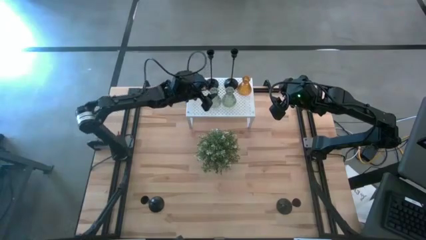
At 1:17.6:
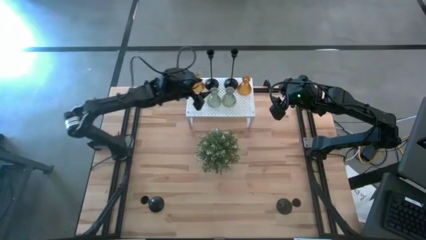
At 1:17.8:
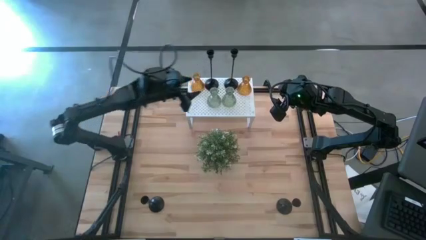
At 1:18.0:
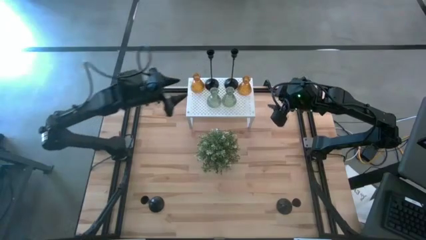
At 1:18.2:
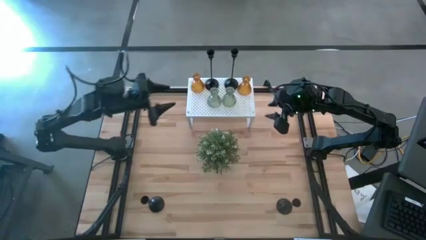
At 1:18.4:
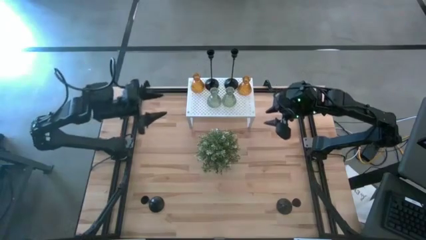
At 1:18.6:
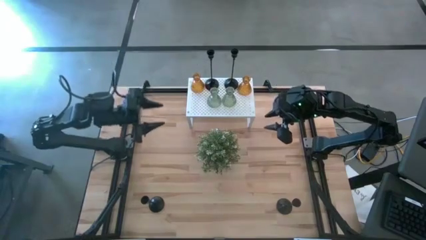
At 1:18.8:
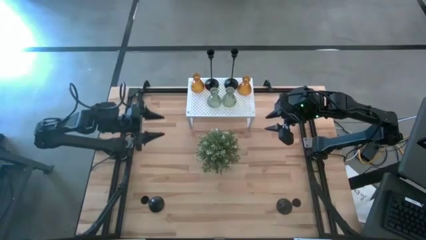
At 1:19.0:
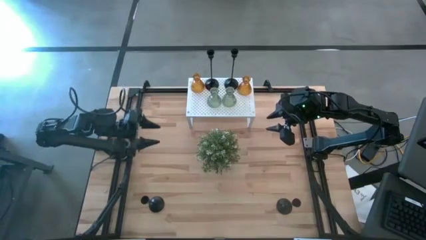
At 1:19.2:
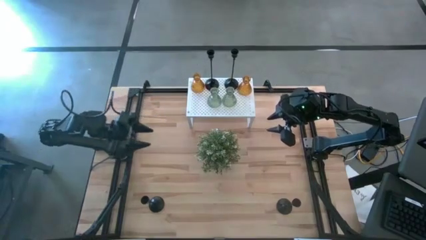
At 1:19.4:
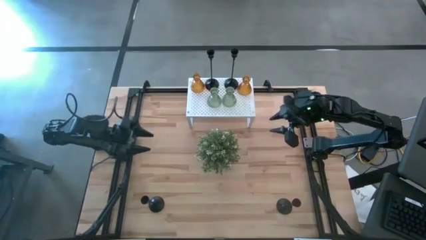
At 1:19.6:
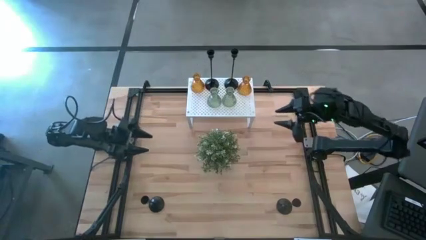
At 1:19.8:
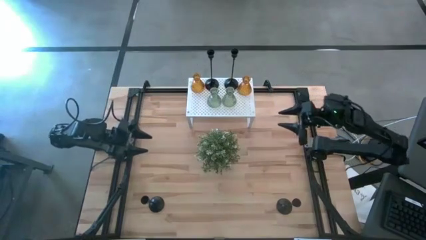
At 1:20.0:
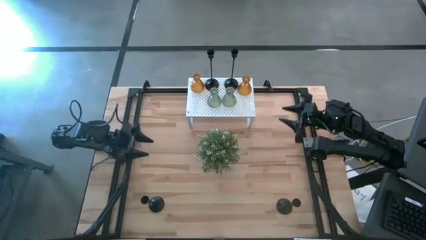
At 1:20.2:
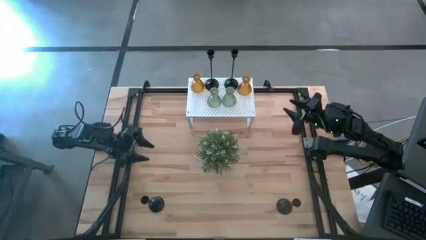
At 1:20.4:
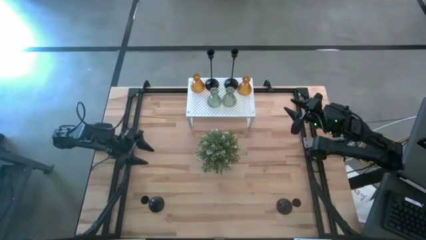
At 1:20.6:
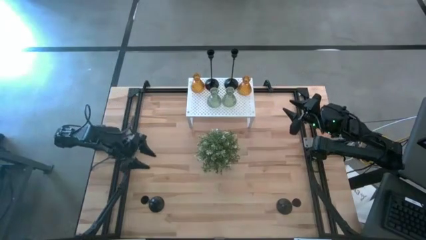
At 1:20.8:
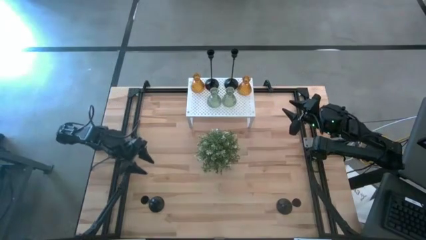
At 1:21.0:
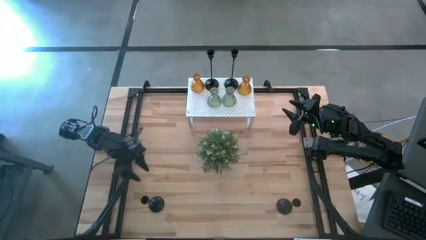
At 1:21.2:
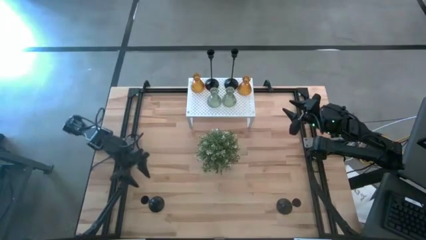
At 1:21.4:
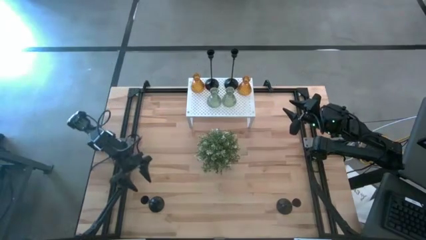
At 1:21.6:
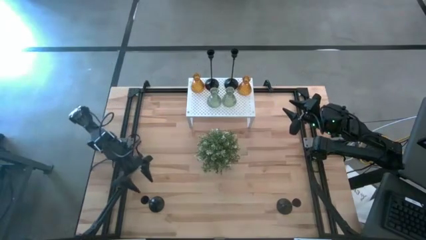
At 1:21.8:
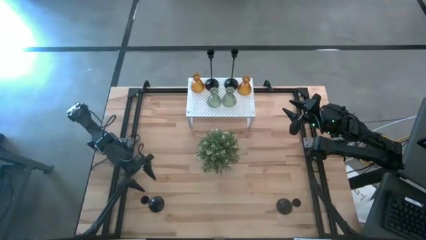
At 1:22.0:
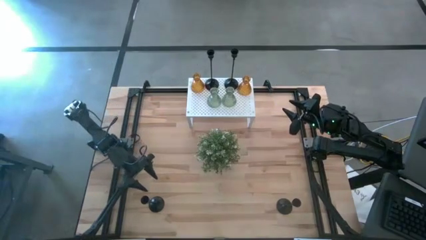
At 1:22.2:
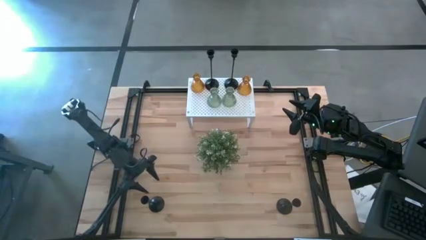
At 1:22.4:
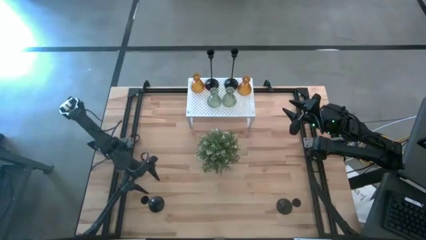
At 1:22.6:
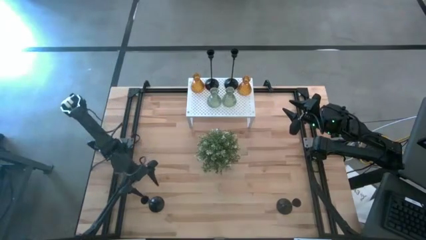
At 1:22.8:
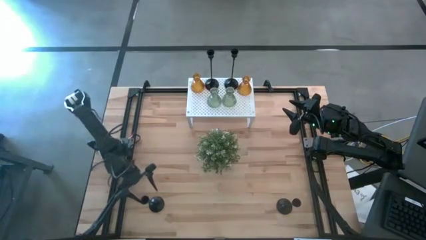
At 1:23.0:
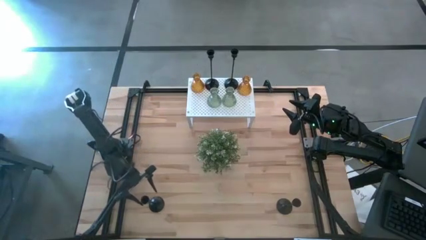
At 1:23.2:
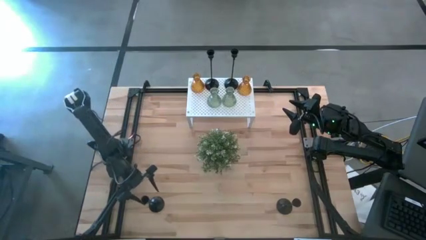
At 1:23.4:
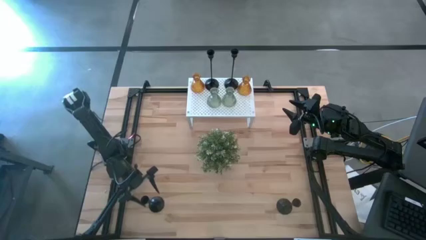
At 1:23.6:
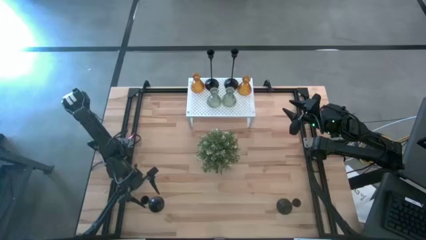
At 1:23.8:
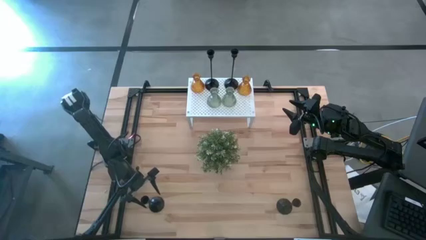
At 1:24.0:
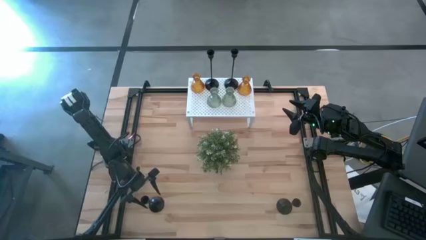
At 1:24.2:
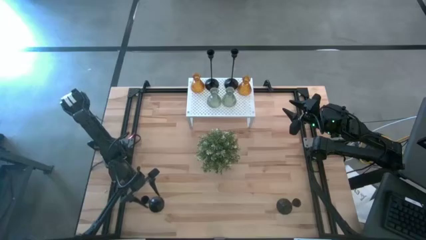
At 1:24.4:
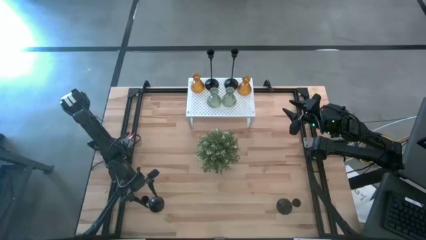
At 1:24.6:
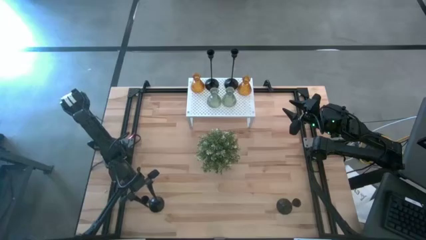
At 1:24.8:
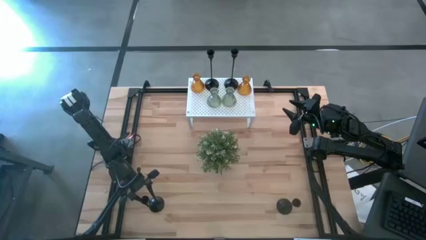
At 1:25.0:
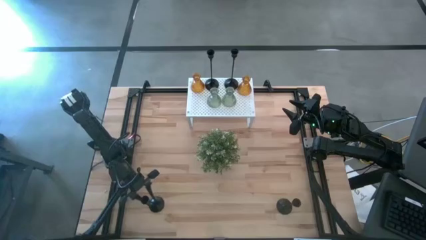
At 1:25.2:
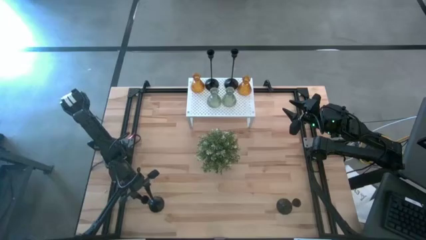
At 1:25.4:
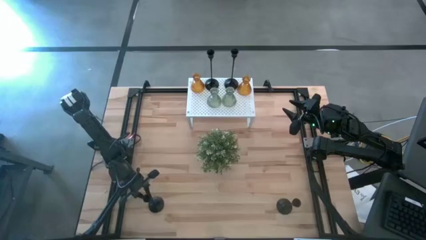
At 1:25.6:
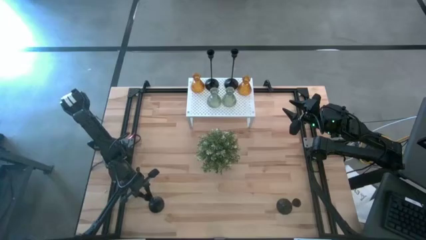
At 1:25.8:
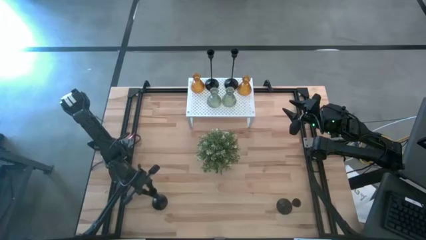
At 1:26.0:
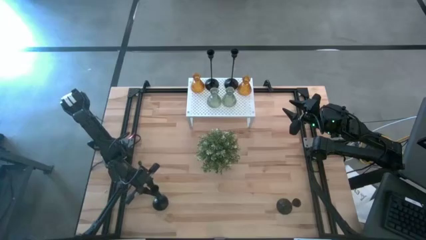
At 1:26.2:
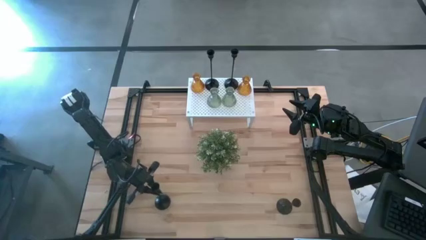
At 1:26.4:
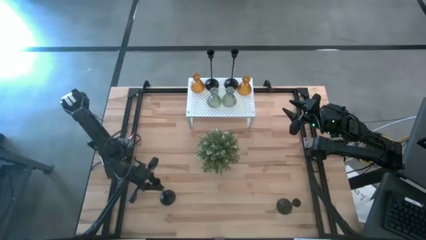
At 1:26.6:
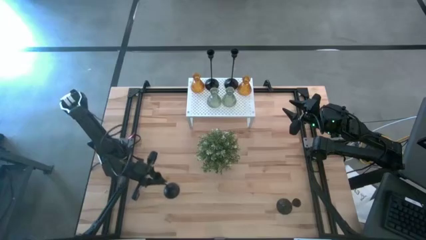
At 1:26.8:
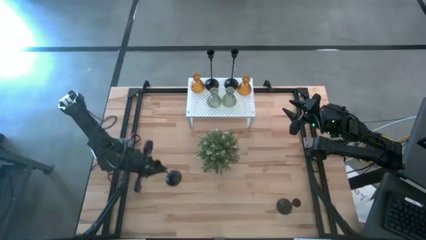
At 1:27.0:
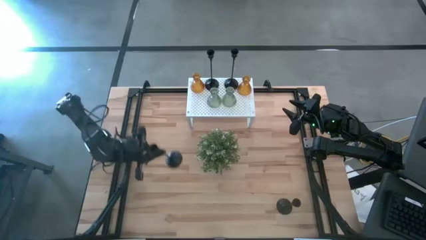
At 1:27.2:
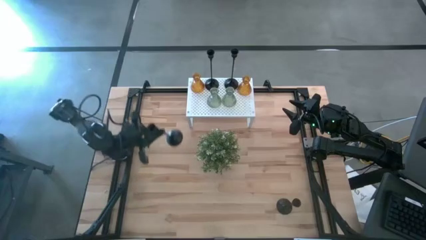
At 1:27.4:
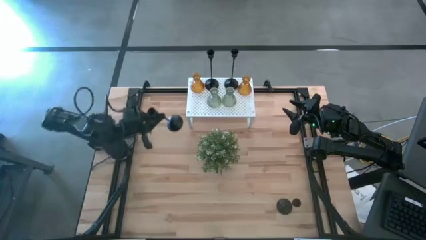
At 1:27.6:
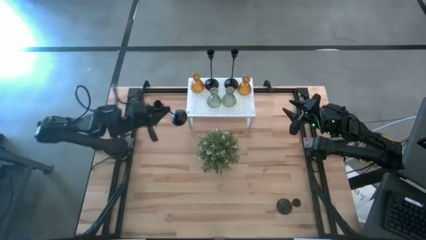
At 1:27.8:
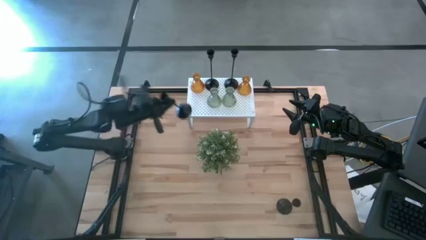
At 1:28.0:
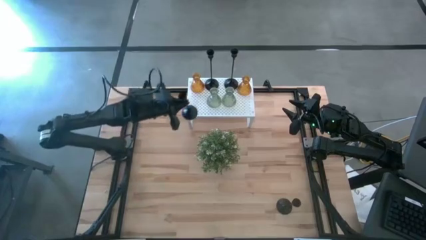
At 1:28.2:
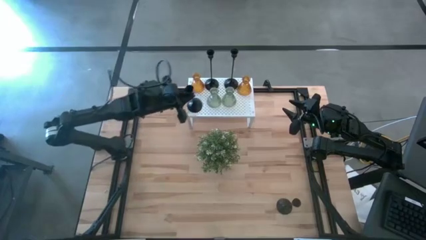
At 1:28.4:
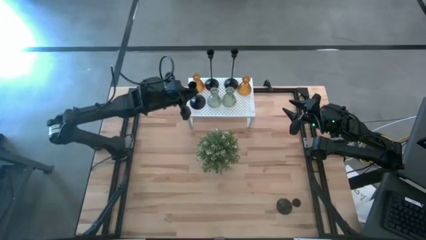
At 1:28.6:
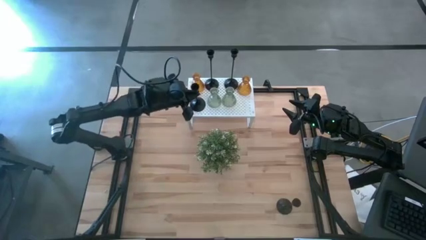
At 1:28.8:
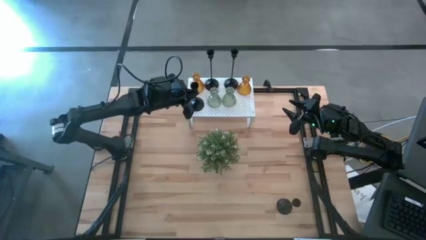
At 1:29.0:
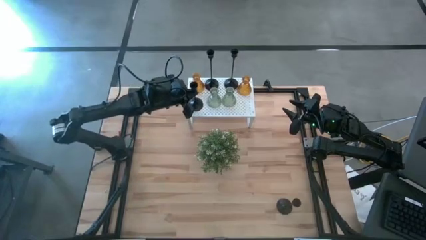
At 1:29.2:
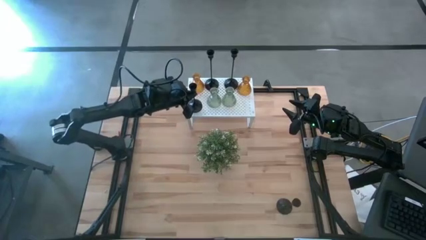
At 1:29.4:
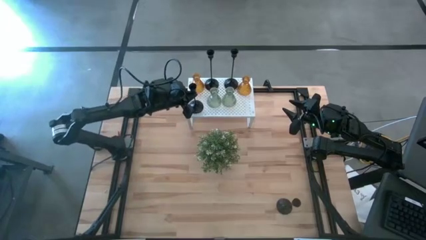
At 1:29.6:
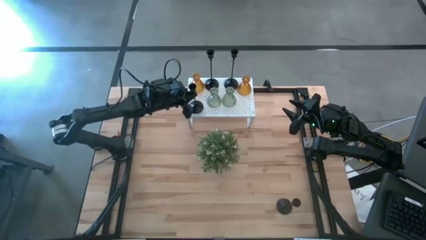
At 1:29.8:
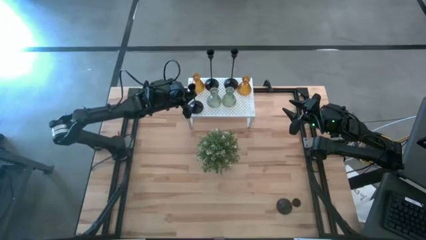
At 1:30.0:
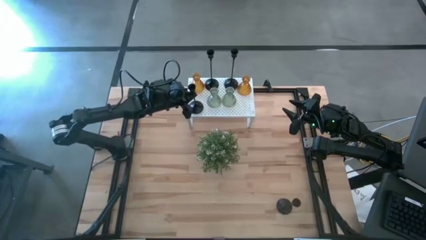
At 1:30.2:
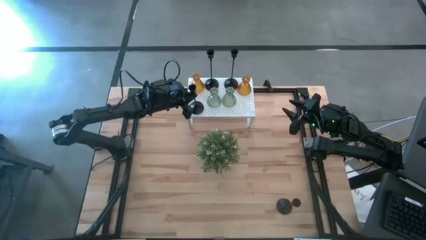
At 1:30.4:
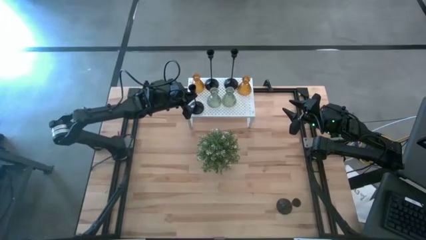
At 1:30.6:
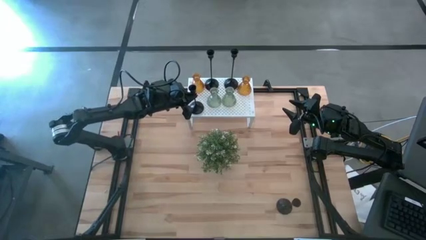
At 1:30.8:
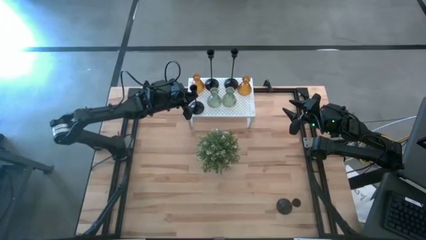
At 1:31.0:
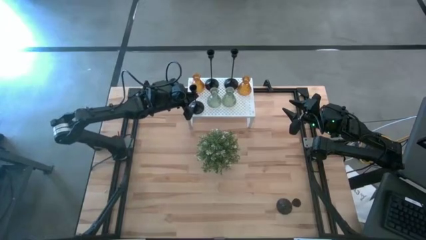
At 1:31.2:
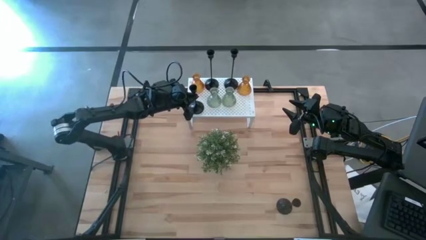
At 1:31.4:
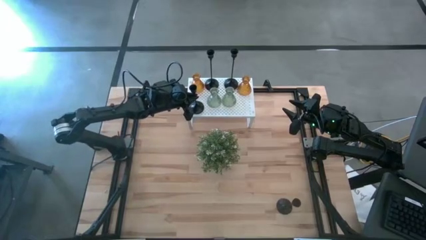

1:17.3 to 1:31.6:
Task: Pick & Place candle stick holders
Put the left small black candle holder on the shelf

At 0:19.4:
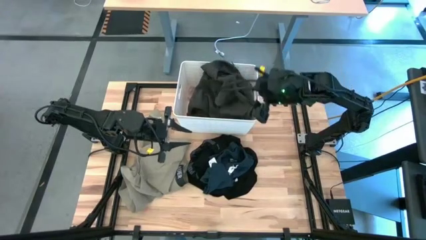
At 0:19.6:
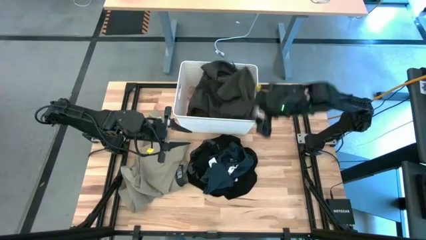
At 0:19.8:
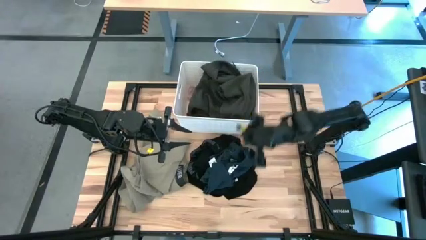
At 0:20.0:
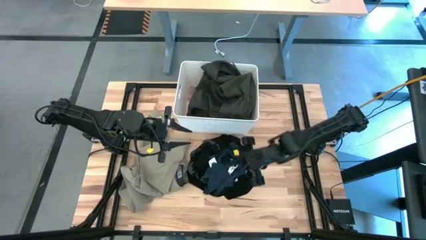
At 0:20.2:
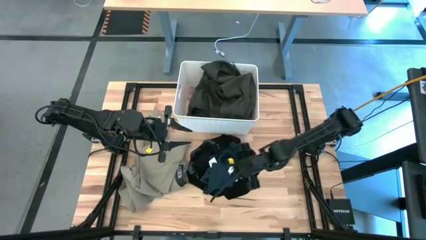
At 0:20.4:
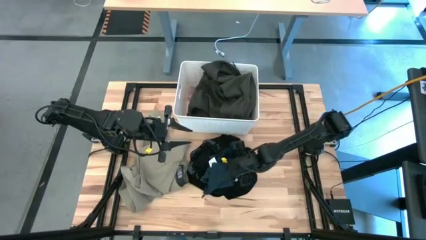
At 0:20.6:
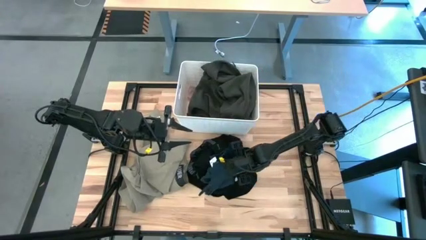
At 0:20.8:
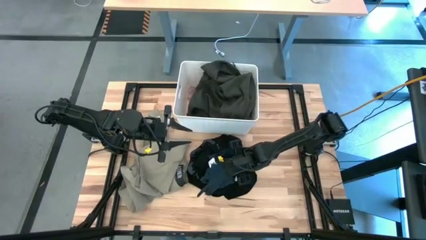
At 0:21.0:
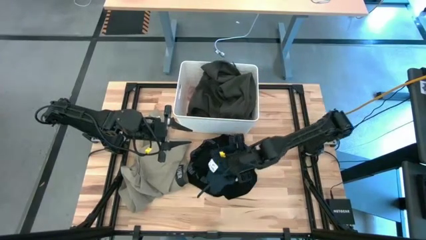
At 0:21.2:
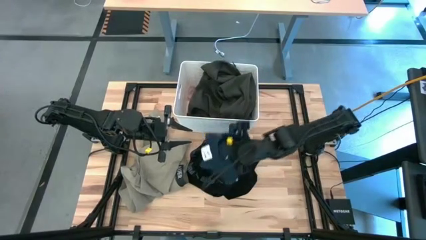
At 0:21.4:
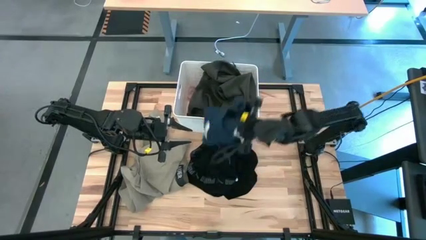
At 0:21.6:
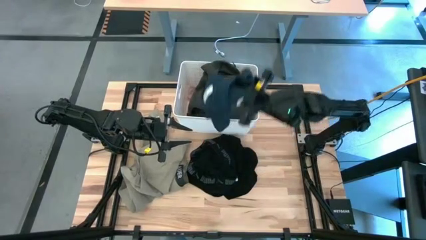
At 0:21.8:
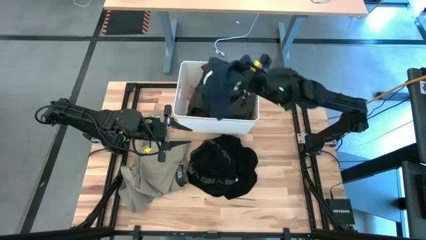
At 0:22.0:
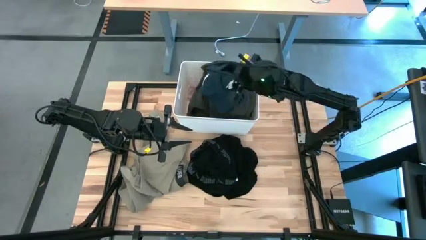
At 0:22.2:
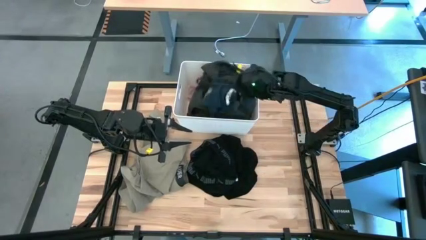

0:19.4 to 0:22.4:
Task: Sort clothes
Put the blue short into the white laundry bin
